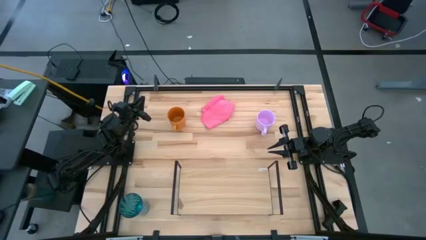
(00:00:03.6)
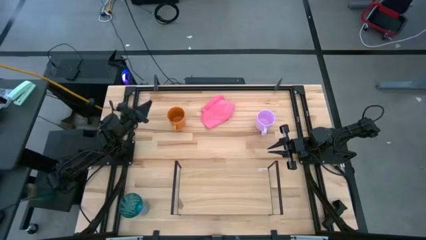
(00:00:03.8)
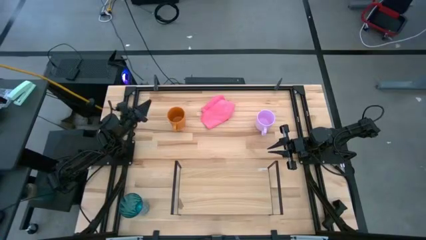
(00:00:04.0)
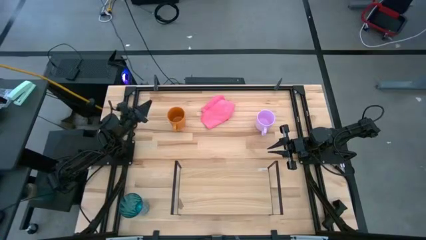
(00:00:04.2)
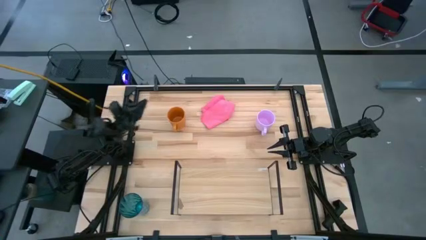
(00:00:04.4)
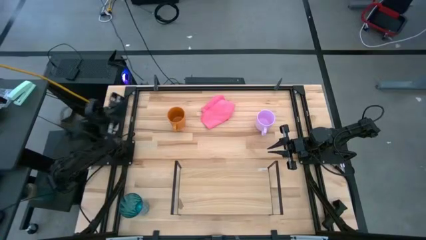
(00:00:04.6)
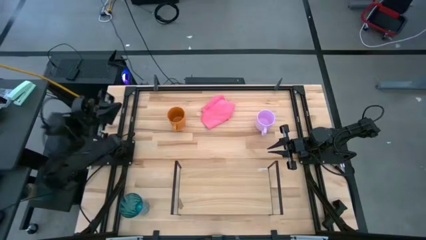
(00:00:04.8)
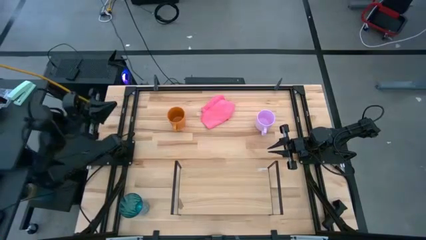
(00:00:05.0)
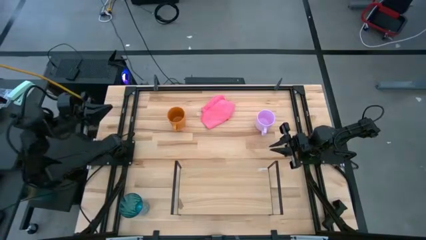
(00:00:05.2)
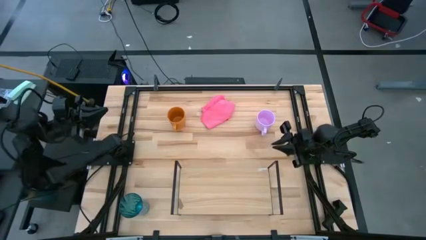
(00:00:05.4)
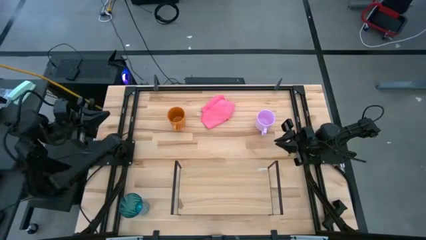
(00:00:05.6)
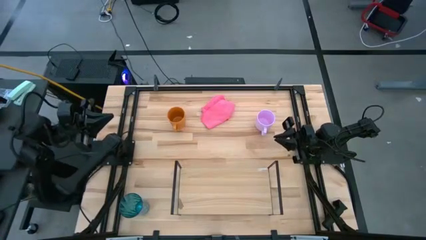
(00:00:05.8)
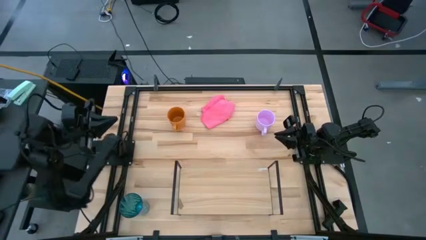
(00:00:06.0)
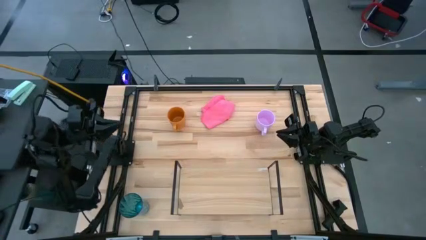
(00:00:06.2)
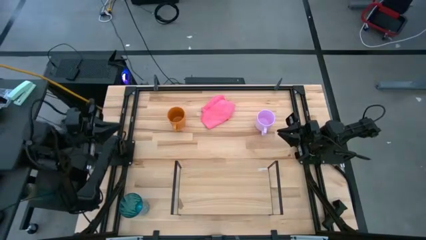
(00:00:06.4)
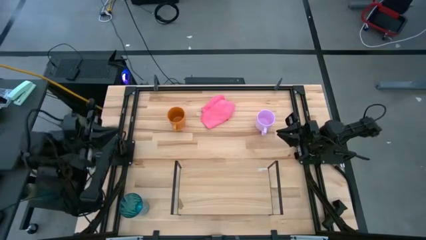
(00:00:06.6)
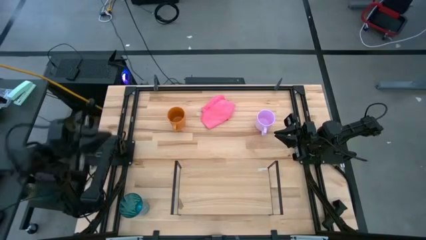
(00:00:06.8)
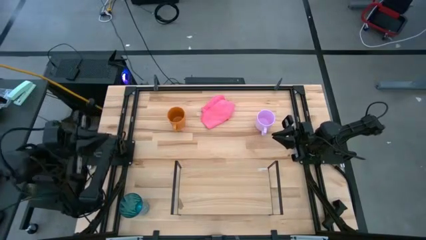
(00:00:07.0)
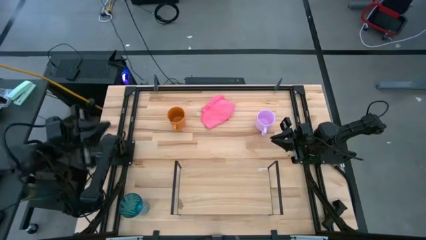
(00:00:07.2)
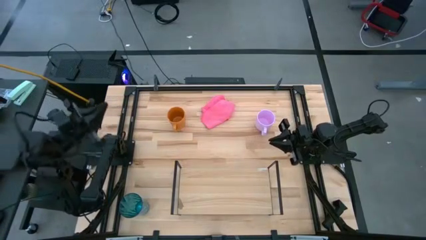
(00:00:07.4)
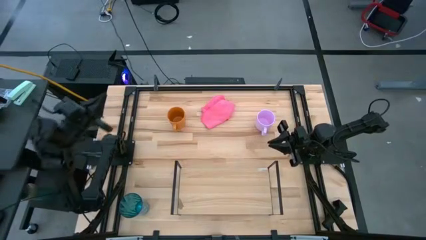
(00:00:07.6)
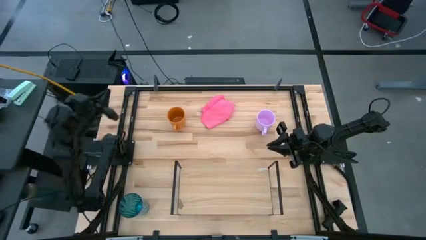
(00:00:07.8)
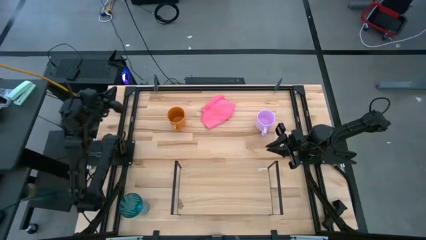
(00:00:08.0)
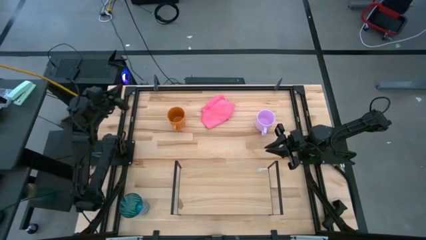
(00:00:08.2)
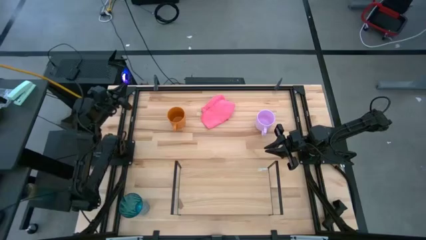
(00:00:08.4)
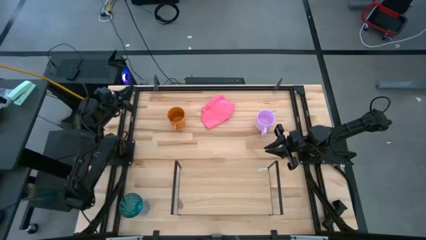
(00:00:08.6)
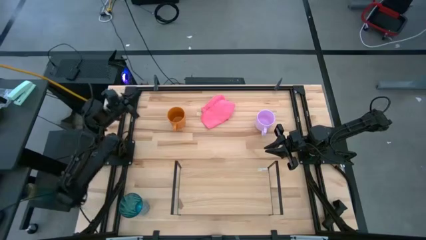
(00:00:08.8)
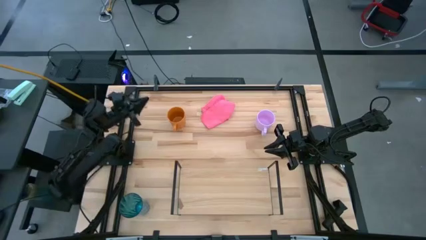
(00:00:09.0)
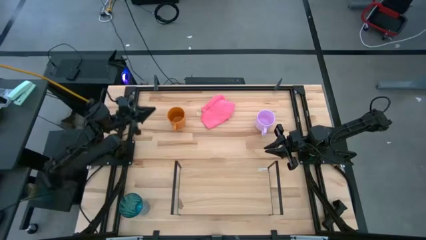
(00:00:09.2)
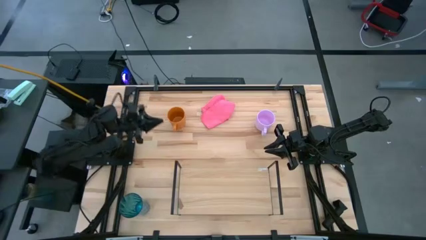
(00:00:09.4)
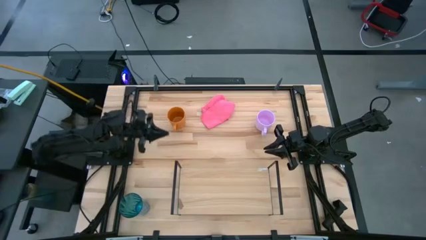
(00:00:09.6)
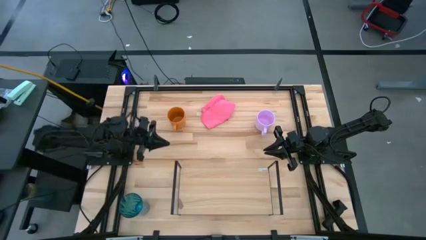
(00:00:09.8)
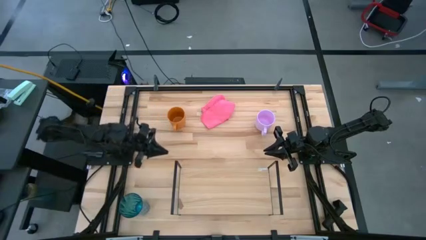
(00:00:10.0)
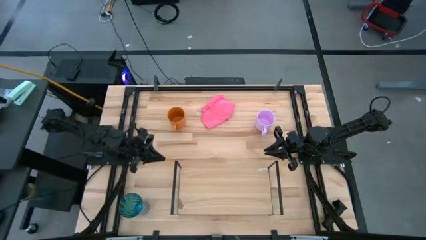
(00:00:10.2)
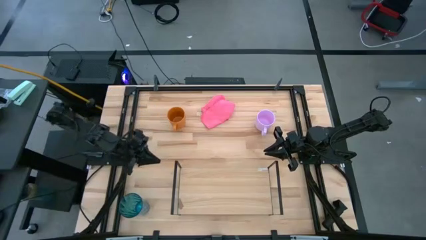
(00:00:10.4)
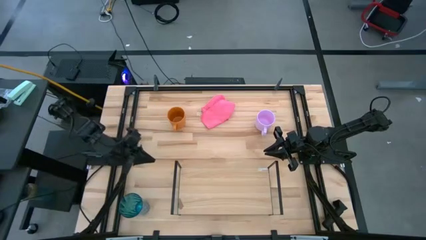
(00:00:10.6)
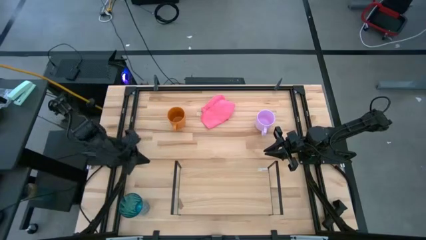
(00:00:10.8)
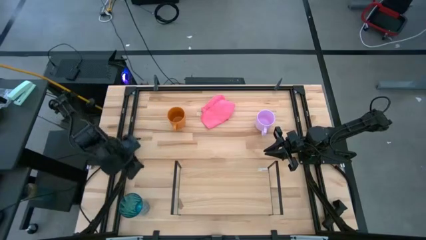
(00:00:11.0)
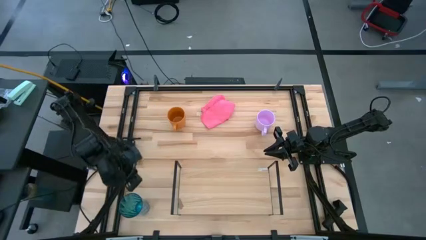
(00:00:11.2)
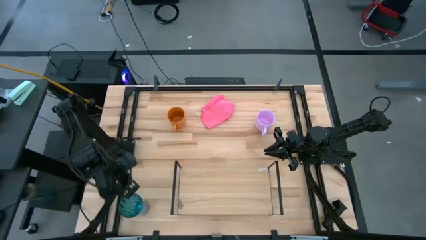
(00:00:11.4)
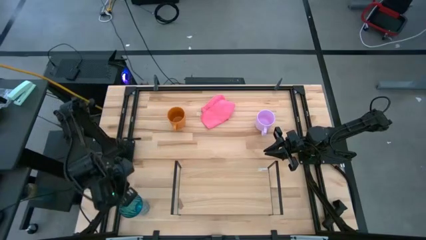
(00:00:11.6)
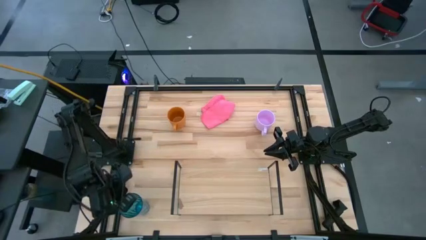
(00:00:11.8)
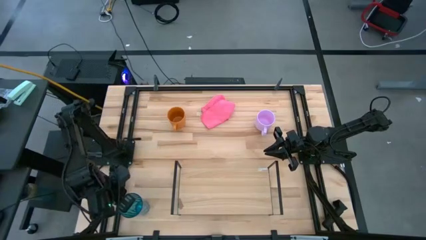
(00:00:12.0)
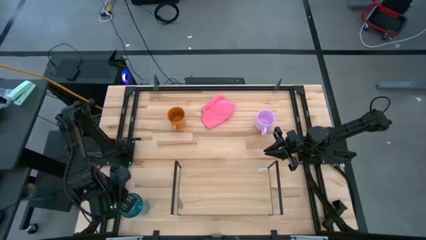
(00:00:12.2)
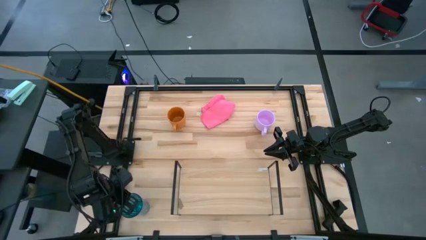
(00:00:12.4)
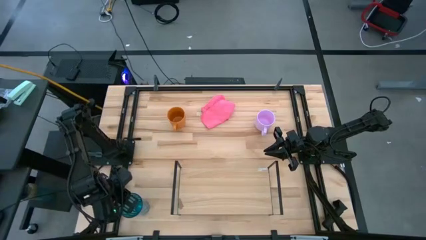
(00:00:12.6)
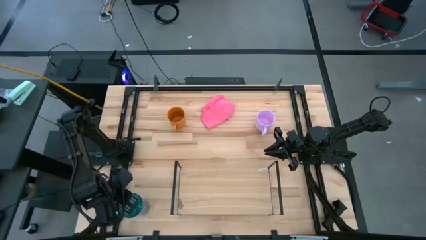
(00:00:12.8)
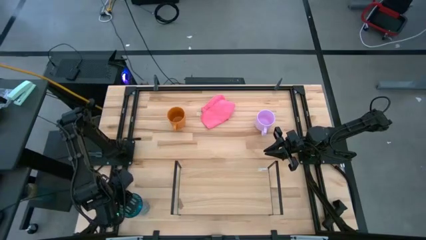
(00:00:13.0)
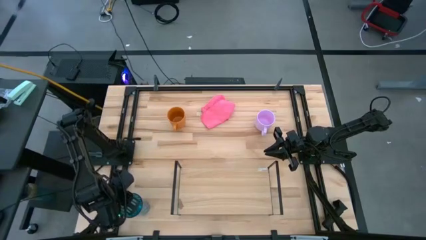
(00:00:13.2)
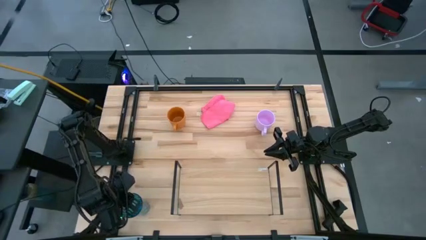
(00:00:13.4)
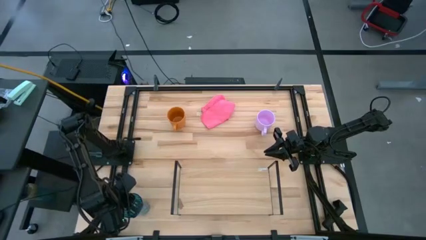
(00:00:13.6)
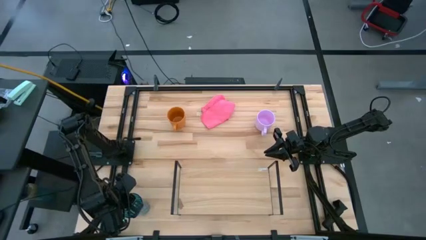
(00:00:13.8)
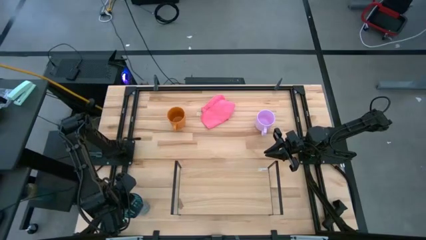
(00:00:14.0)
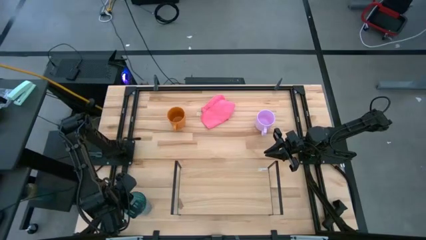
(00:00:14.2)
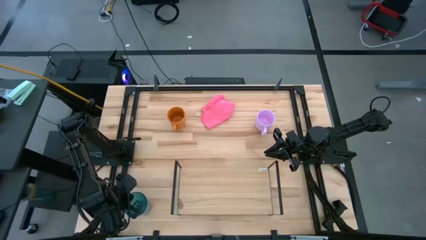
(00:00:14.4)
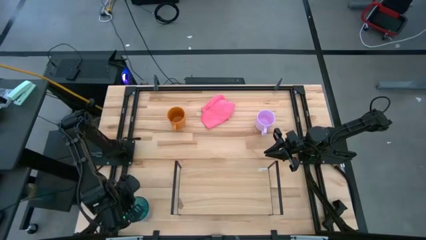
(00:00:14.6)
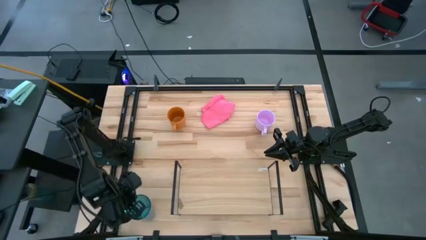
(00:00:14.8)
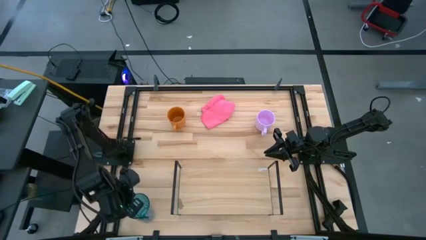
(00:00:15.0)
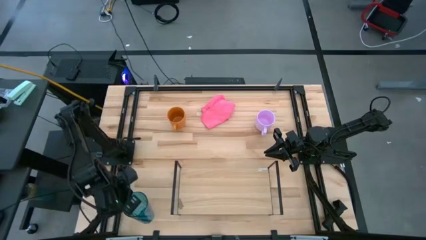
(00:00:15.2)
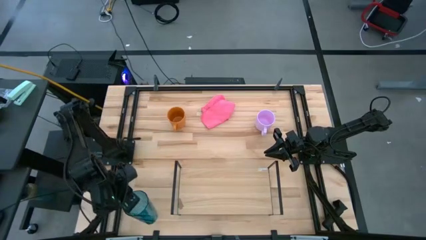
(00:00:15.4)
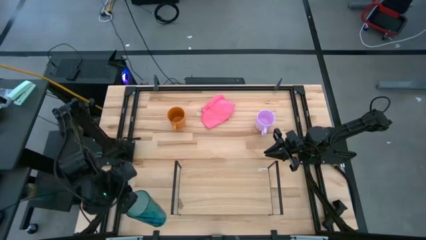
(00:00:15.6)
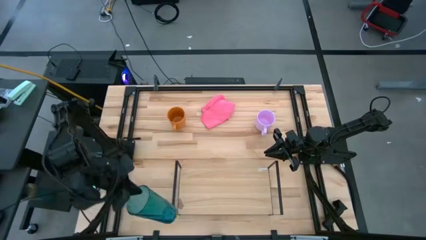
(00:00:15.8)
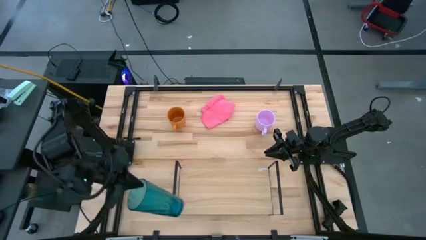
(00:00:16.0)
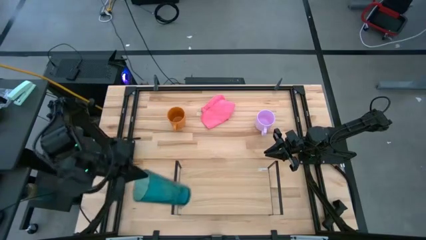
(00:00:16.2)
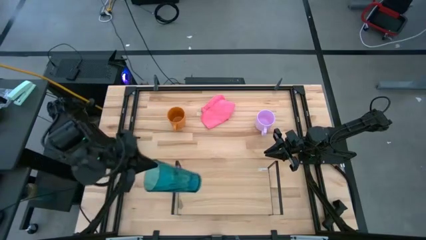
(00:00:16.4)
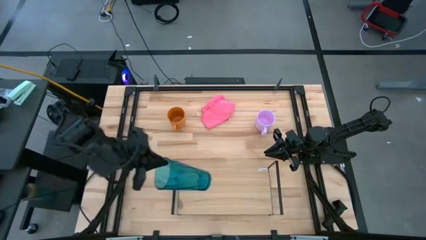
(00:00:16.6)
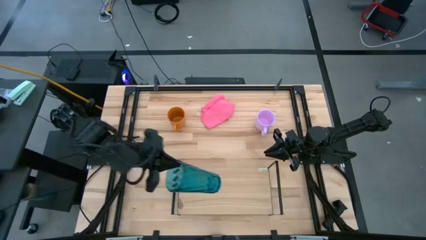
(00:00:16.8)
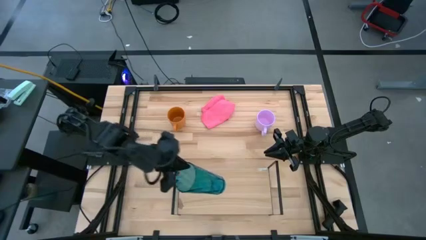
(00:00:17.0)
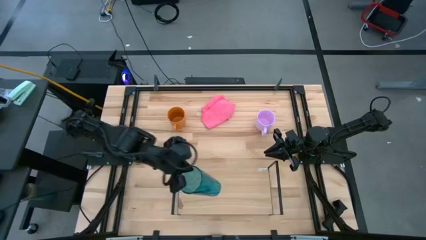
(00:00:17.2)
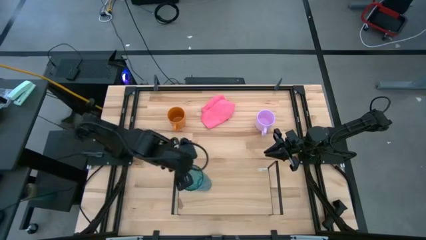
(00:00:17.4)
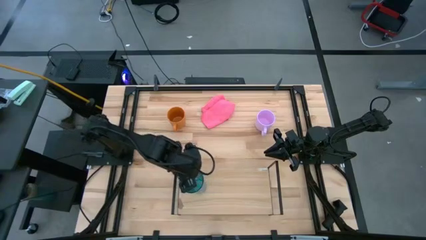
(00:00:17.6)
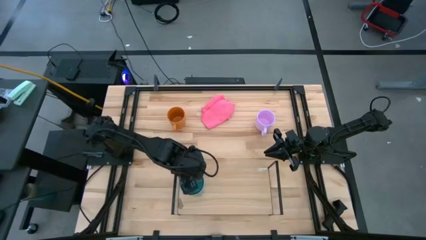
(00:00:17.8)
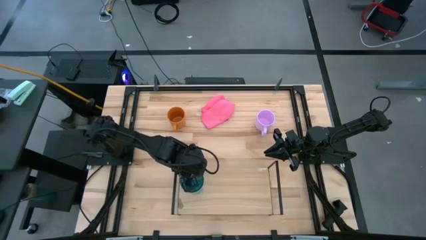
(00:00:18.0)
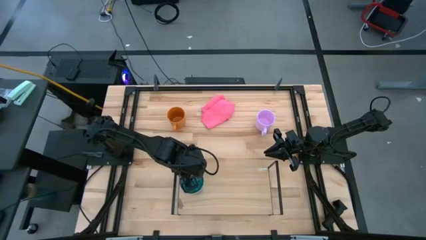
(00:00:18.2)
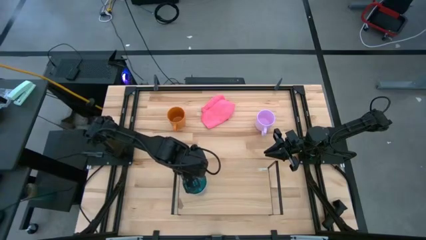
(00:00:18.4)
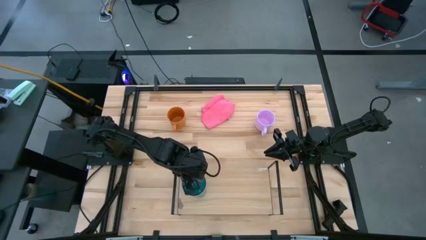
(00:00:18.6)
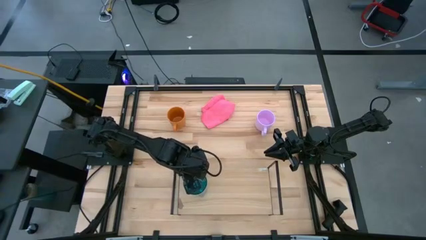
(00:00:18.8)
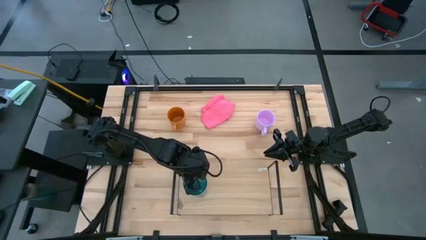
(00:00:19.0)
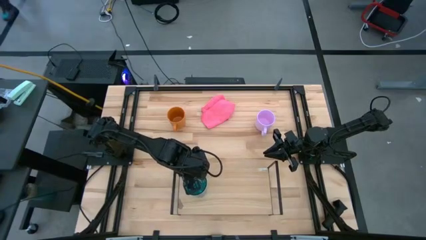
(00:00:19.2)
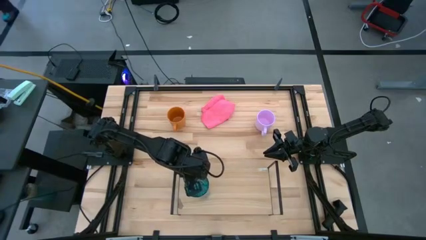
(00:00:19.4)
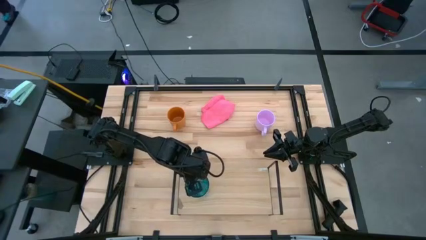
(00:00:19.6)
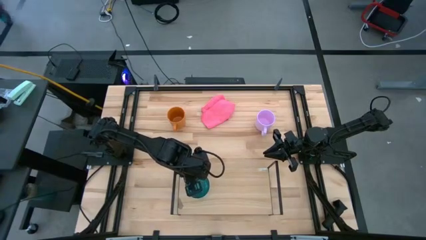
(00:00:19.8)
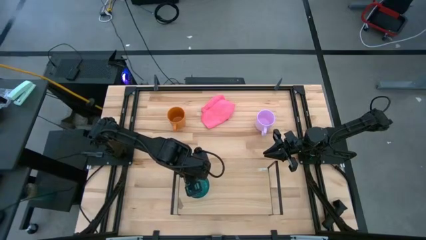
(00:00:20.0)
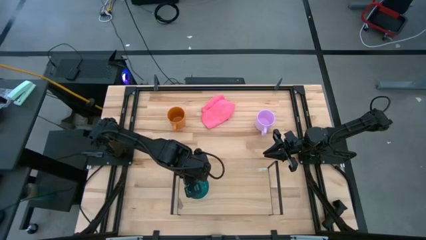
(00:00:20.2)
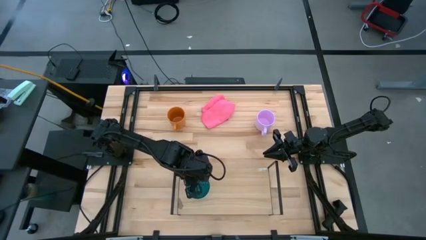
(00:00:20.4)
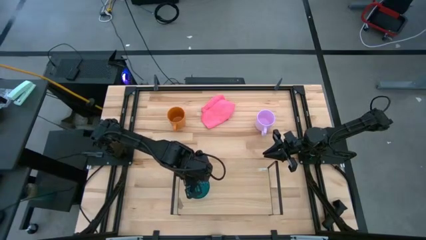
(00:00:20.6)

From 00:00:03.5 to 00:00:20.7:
Task: Stack small to large cups/mugs on shelf
Put the blue cup on the shelf
